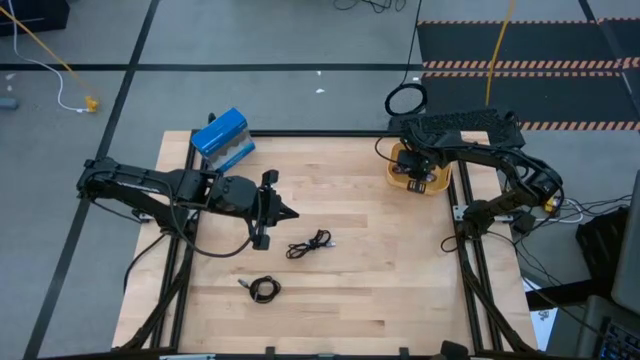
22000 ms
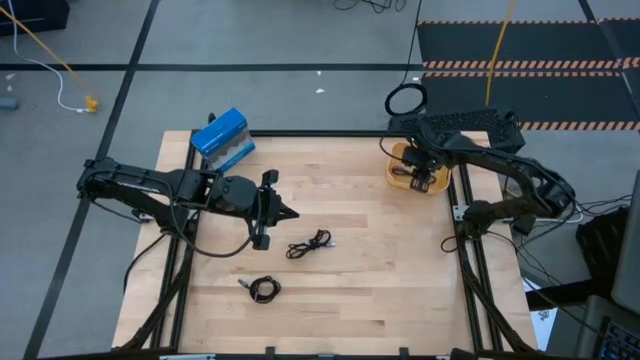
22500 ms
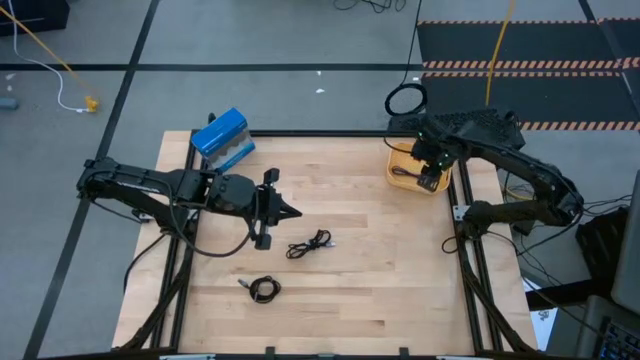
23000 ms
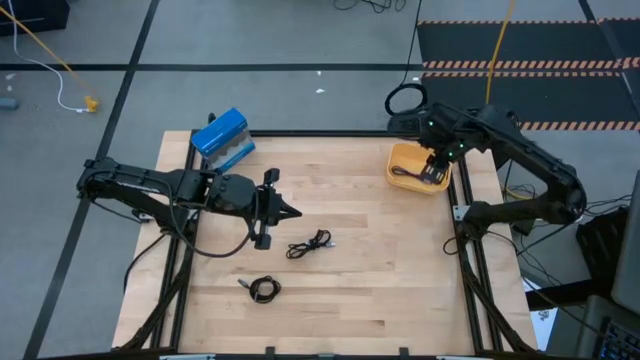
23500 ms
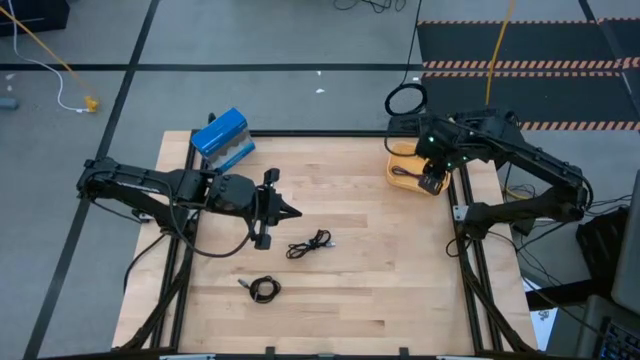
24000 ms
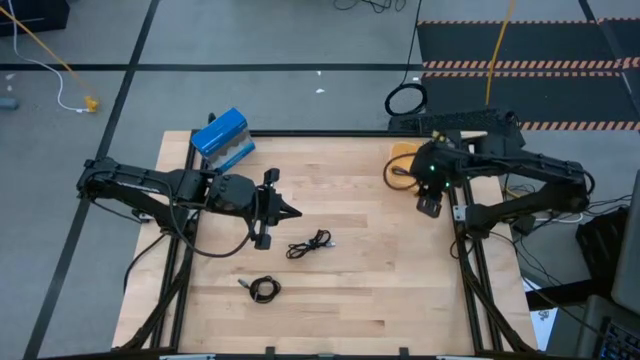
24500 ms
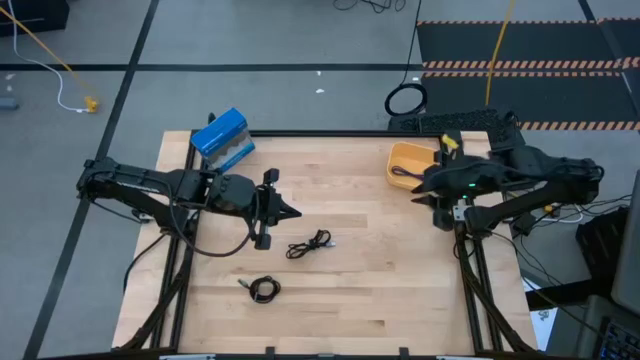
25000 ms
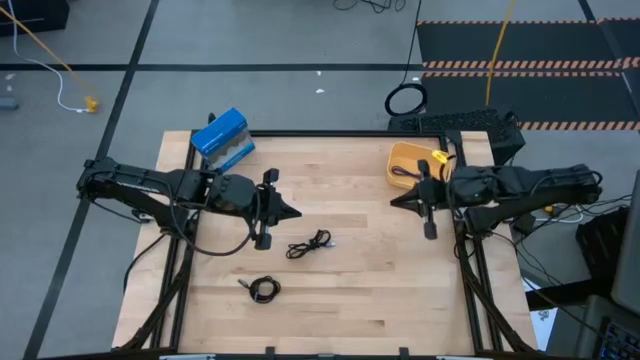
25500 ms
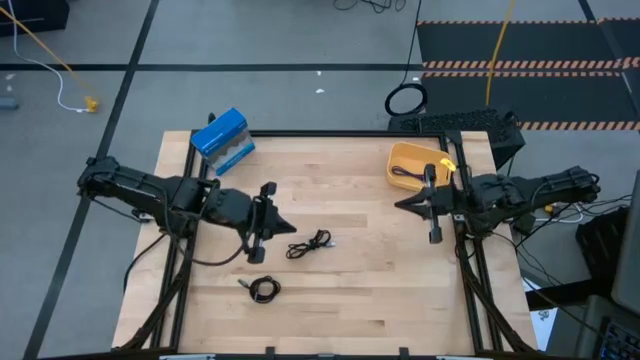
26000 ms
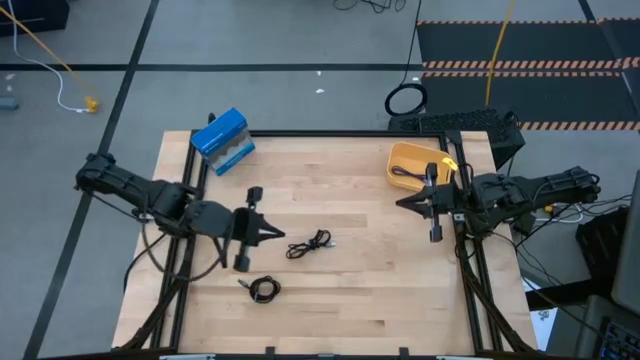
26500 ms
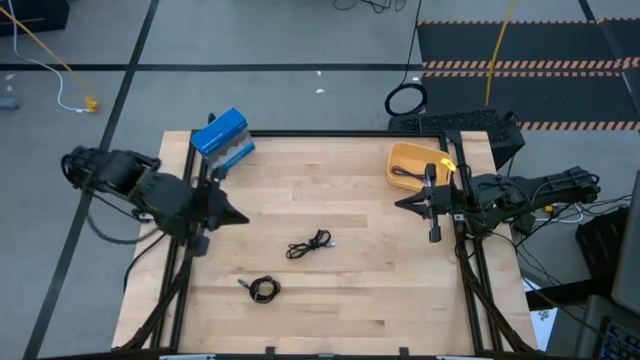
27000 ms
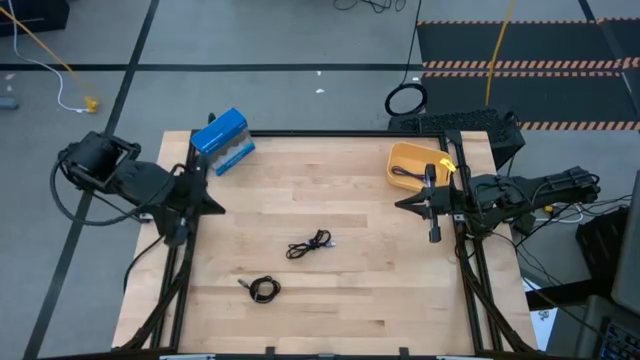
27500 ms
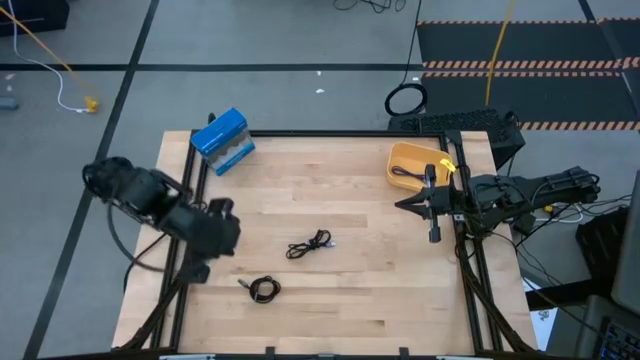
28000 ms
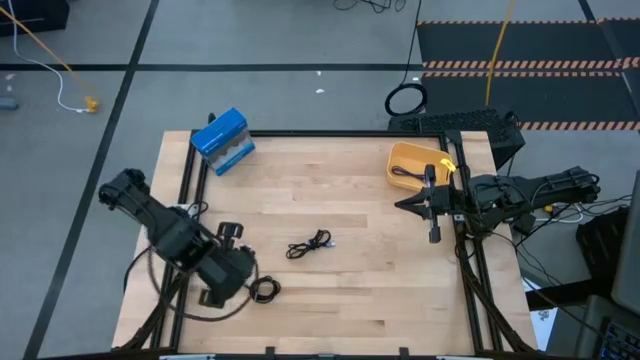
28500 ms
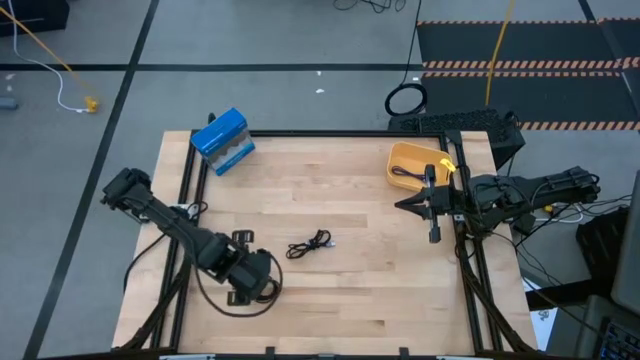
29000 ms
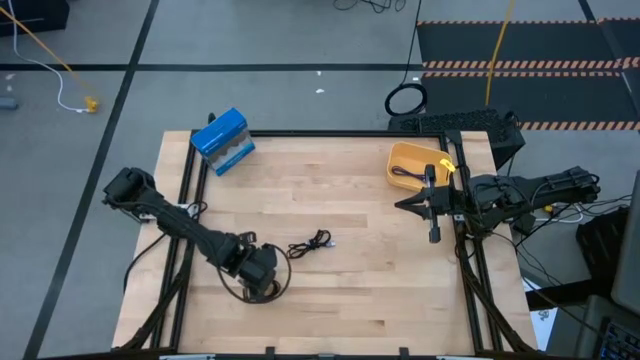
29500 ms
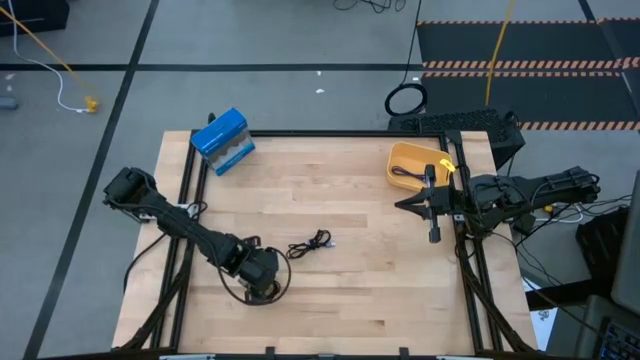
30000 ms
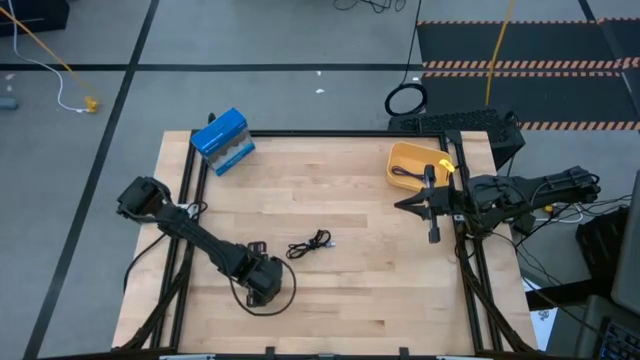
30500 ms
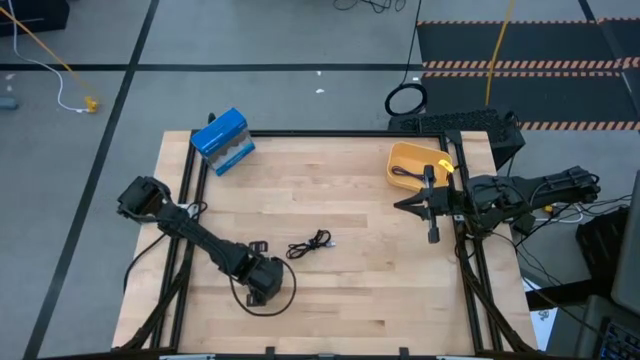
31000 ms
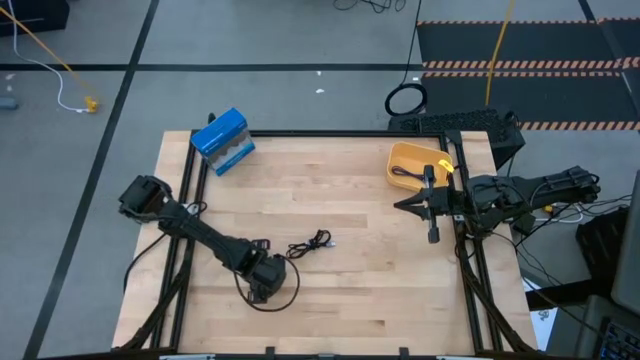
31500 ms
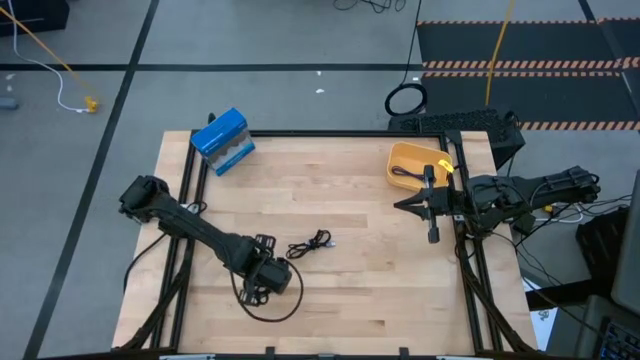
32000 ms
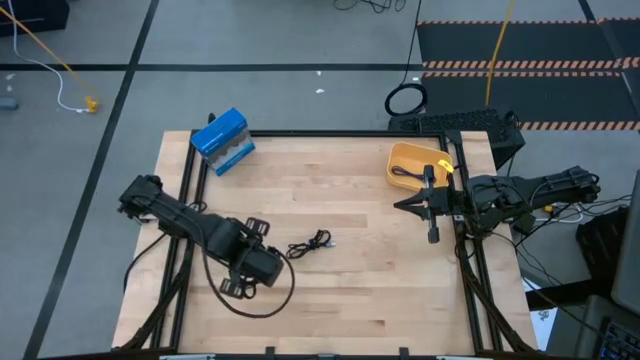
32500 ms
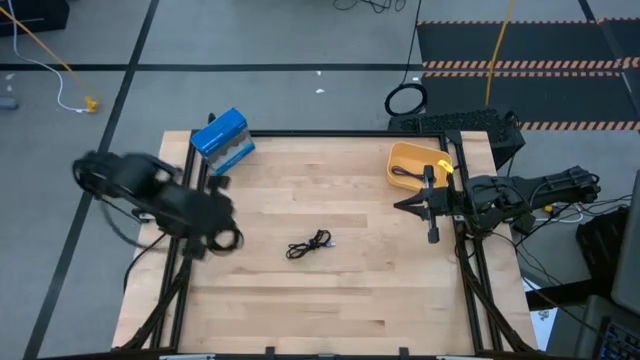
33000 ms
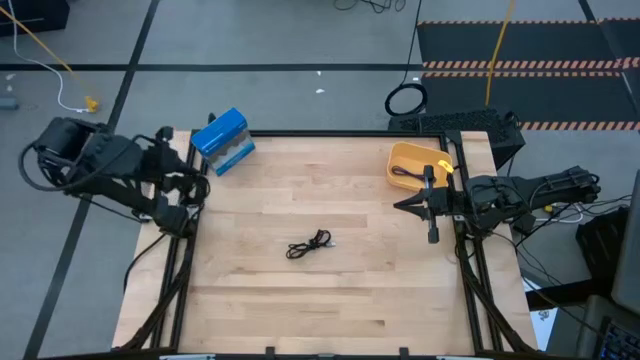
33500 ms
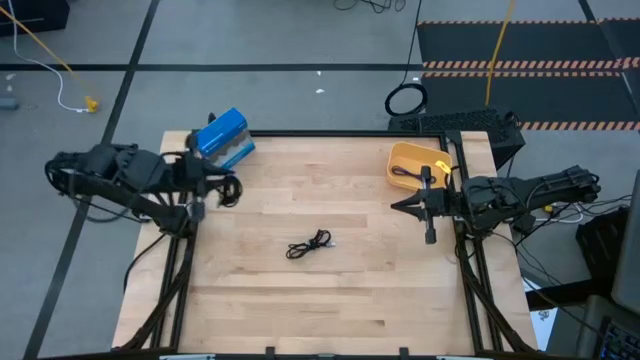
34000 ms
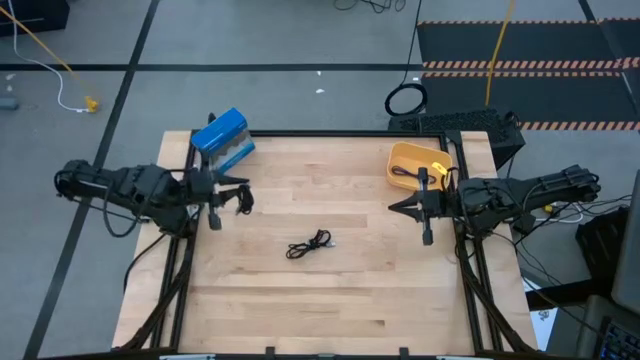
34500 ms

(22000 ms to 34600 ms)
Task: Pick and place USB-C Cables
Put the bottom charger cable into the yellow bin

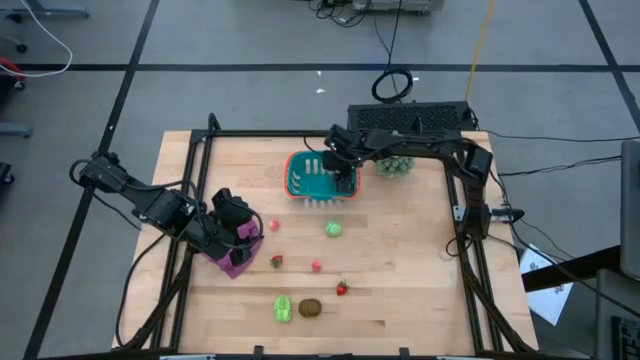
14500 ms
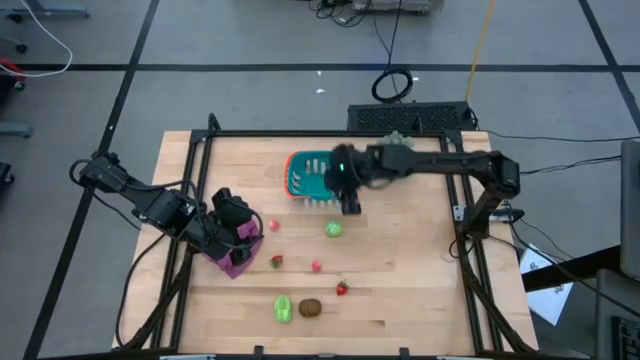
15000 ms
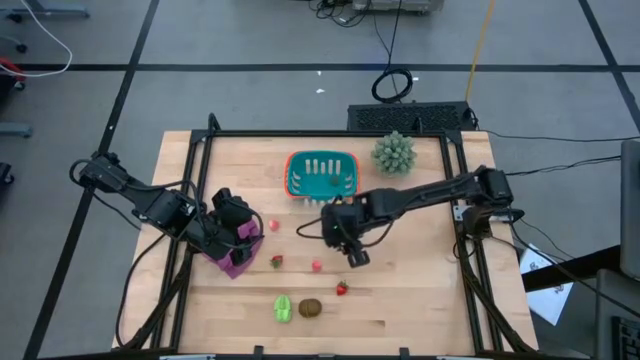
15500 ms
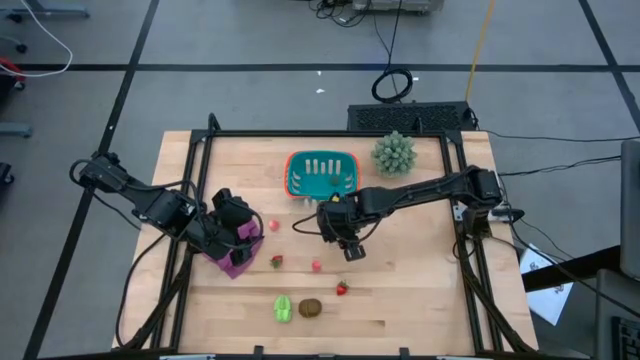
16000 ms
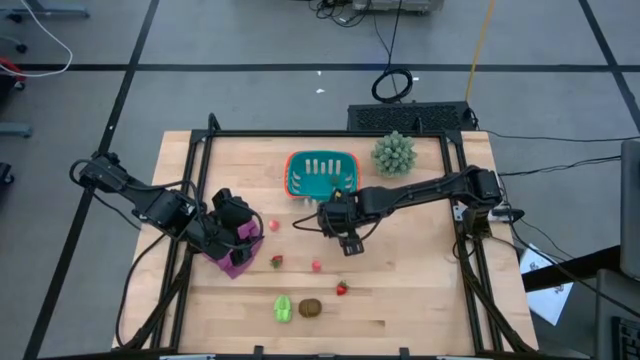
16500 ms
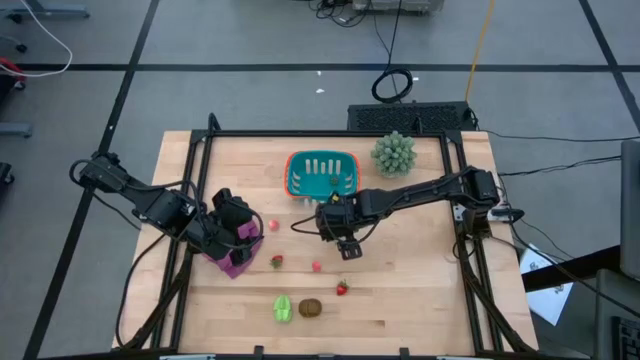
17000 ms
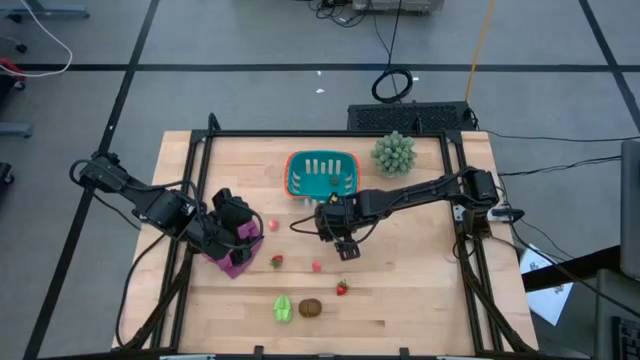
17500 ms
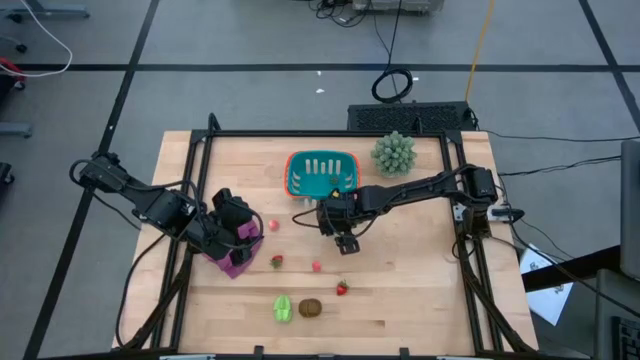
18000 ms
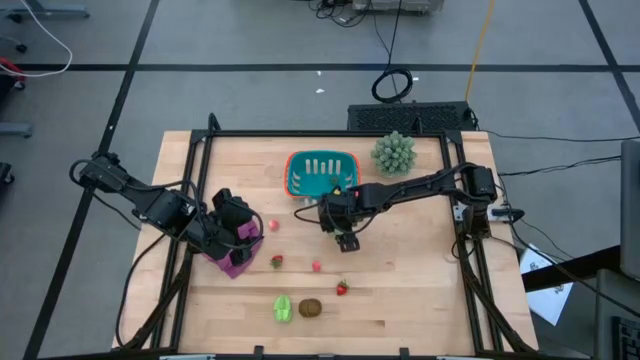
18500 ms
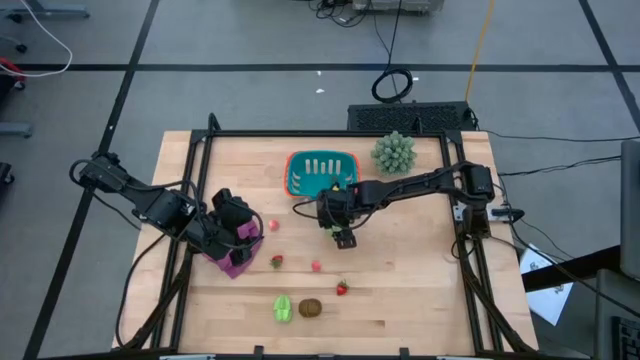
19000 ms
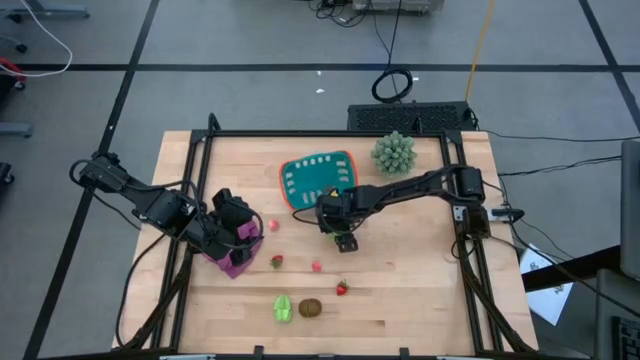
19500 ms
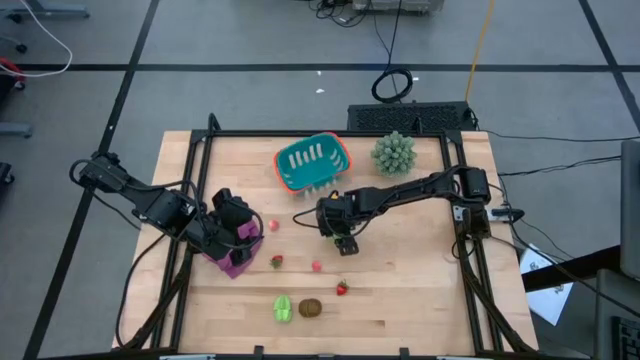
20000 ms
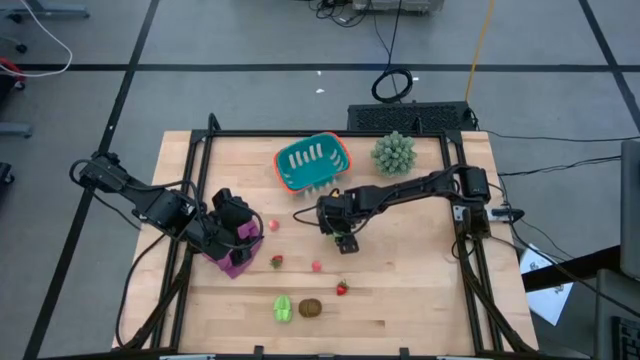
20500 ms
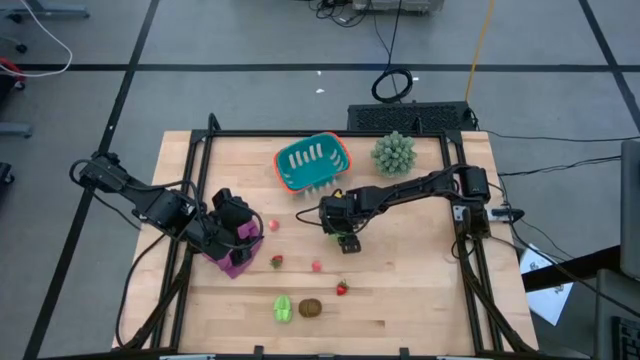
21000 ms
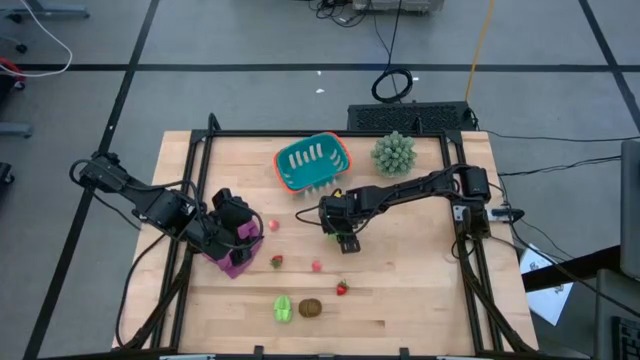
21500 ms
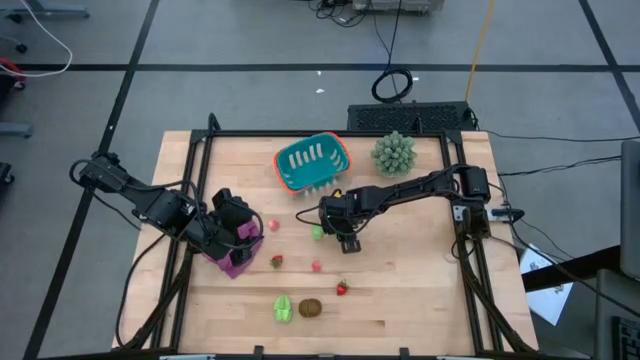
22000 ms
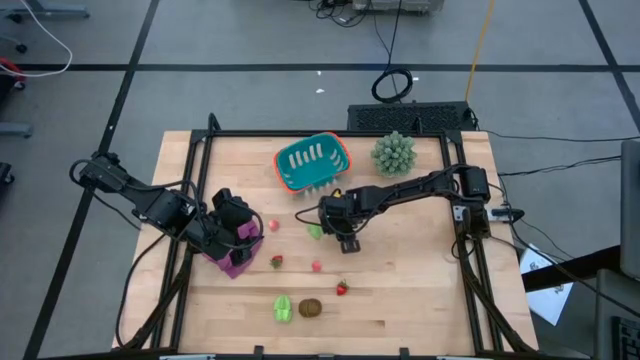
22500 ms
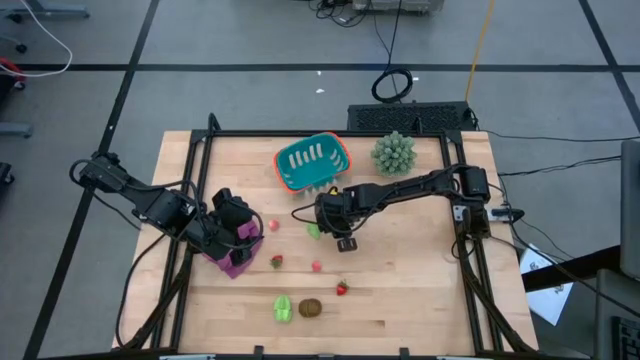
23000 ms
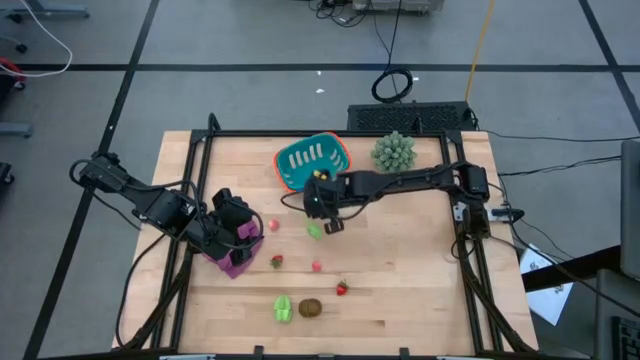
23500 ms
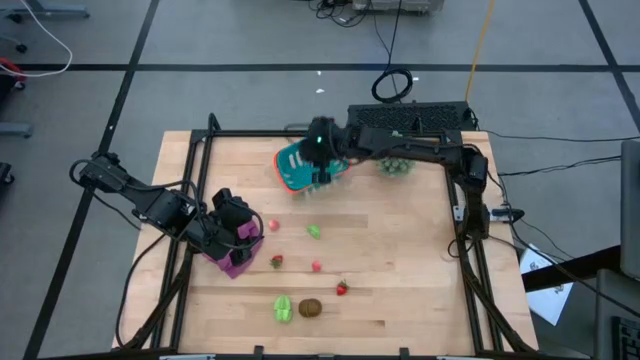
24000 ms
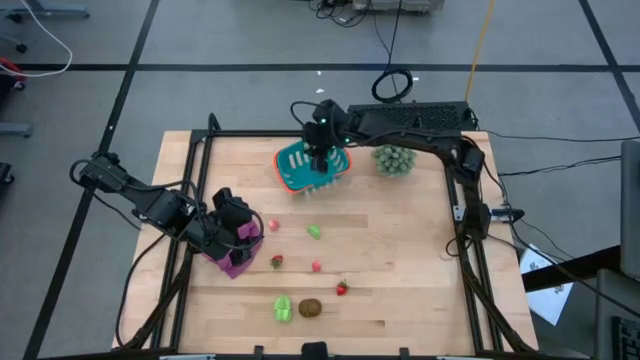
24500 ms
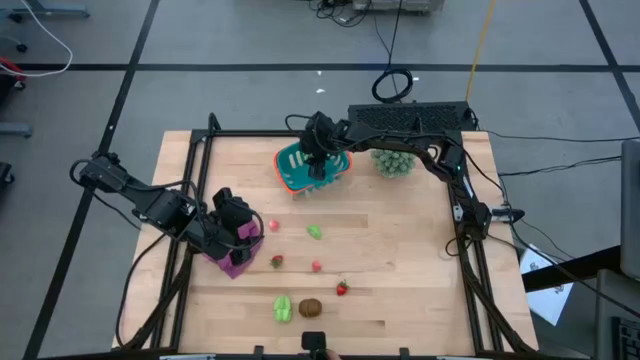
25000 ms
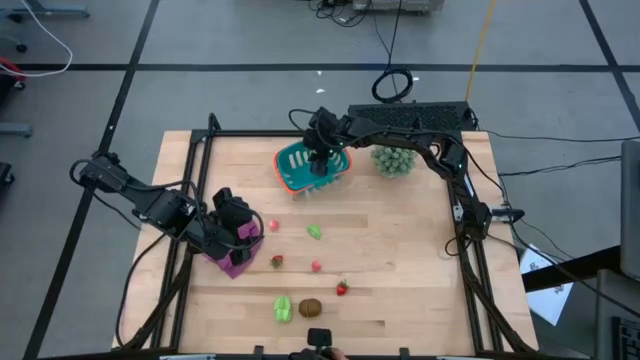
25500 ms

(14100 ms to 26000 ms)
Task: Pick and placing Produce into tupperware
Put the right cabbage half into the blue basket
